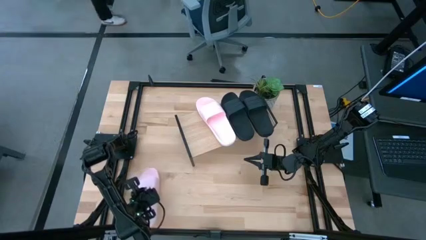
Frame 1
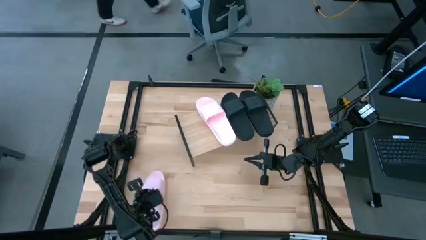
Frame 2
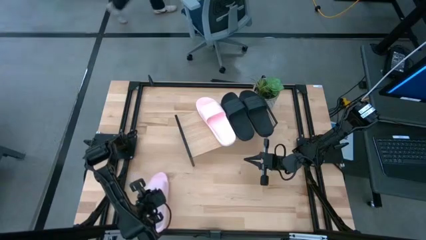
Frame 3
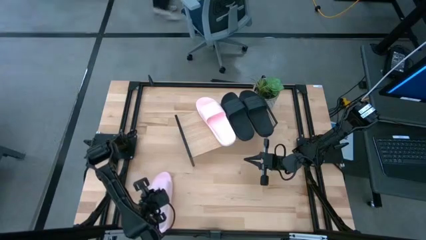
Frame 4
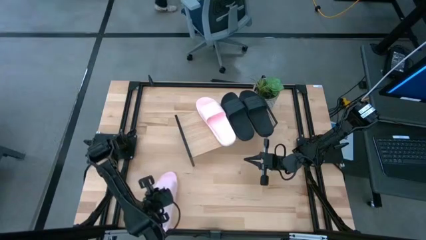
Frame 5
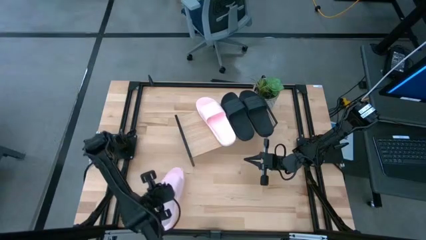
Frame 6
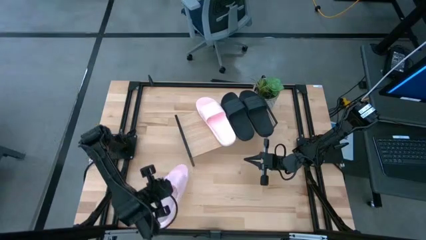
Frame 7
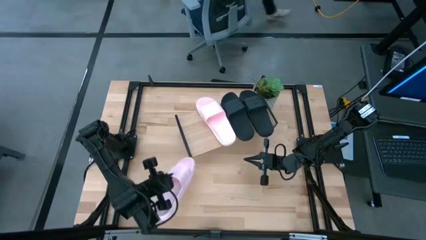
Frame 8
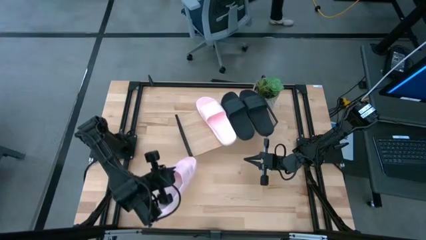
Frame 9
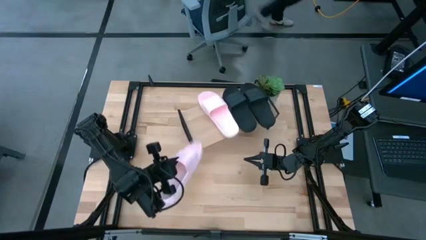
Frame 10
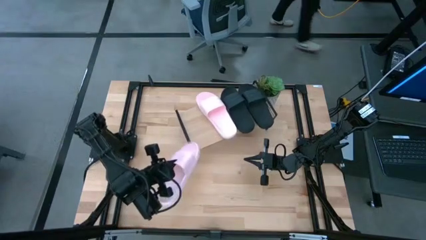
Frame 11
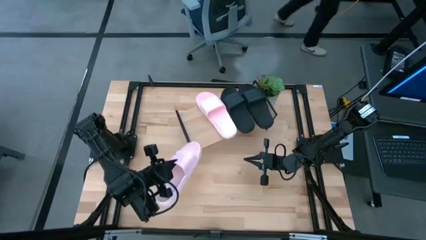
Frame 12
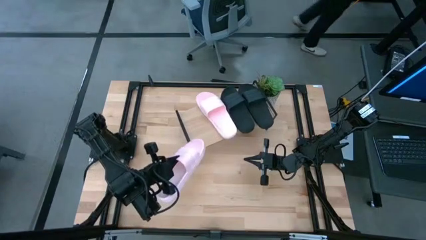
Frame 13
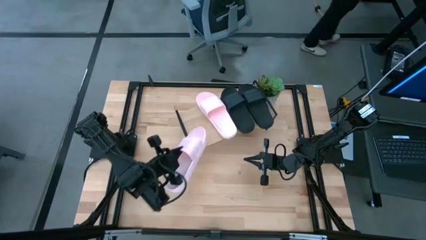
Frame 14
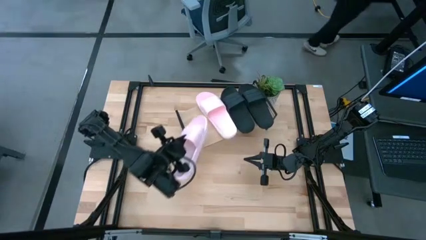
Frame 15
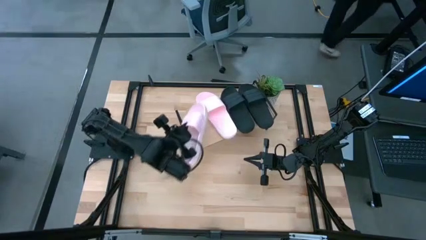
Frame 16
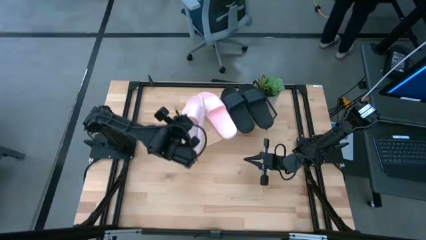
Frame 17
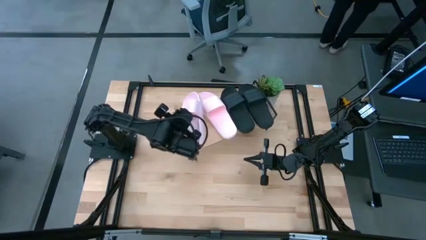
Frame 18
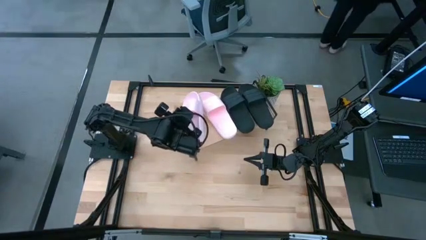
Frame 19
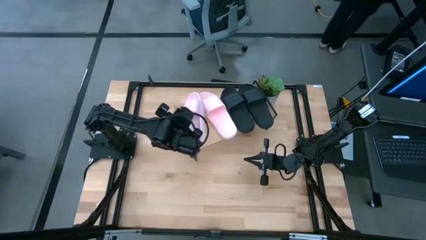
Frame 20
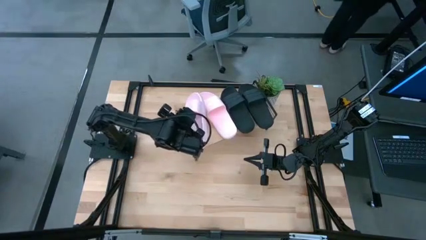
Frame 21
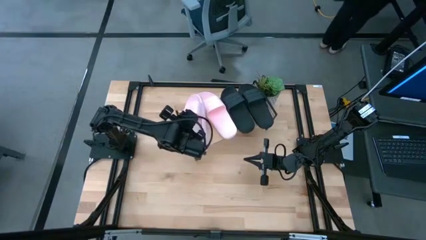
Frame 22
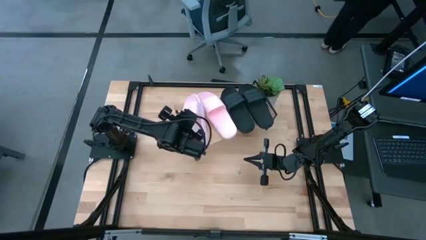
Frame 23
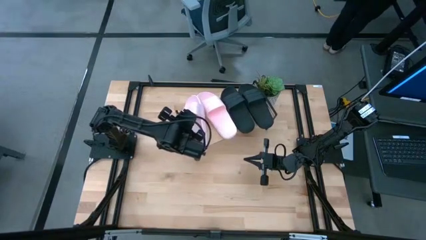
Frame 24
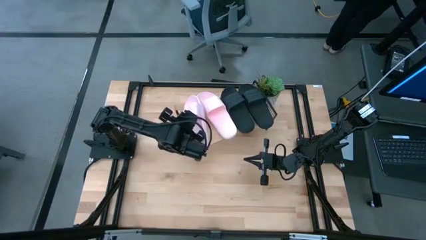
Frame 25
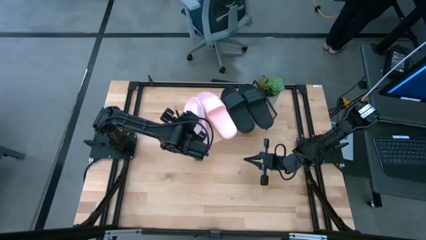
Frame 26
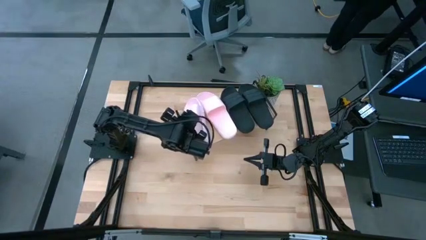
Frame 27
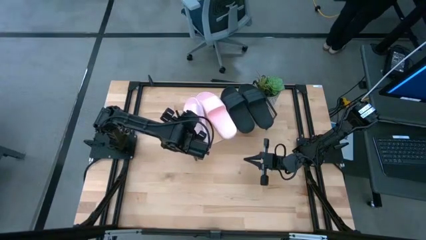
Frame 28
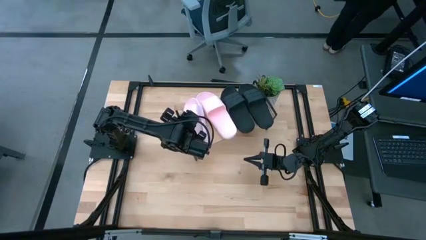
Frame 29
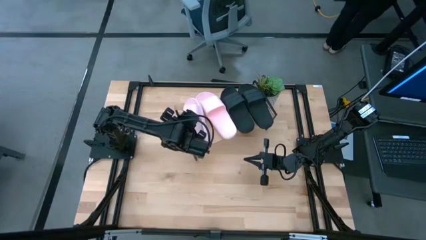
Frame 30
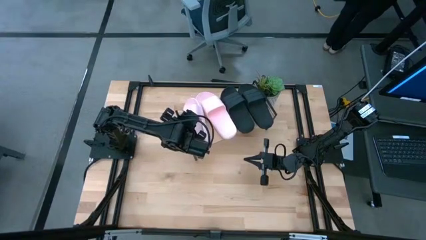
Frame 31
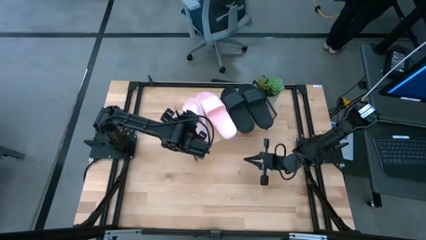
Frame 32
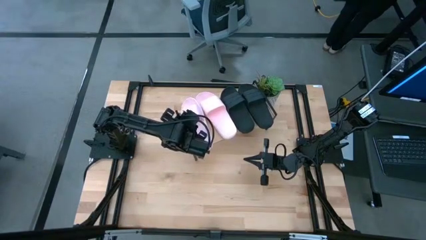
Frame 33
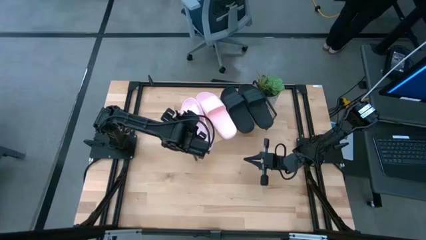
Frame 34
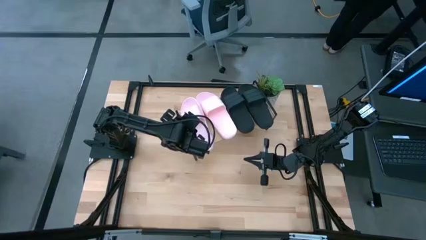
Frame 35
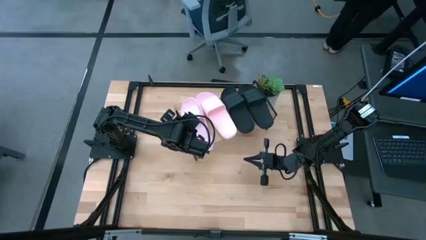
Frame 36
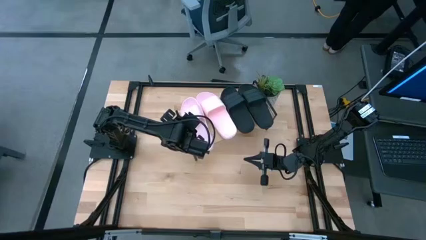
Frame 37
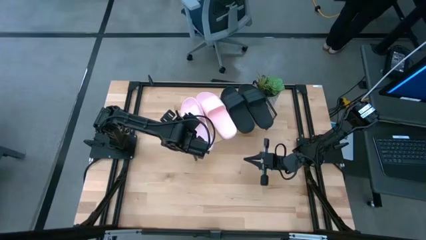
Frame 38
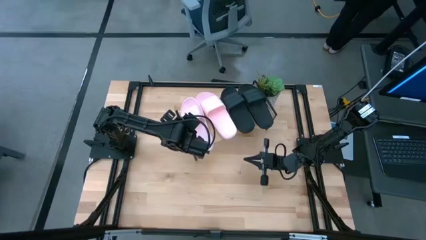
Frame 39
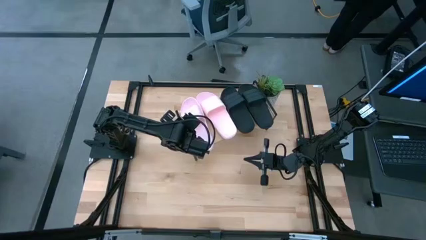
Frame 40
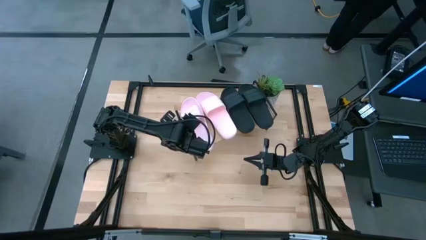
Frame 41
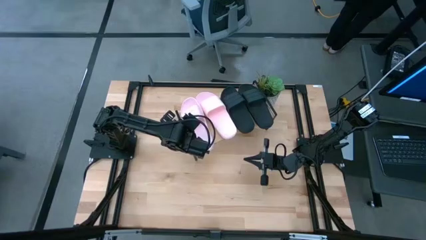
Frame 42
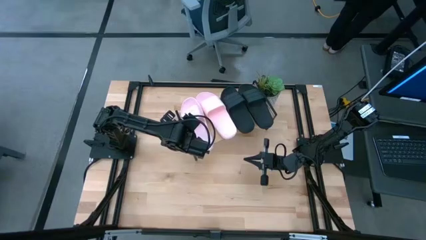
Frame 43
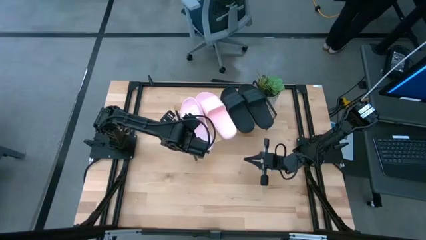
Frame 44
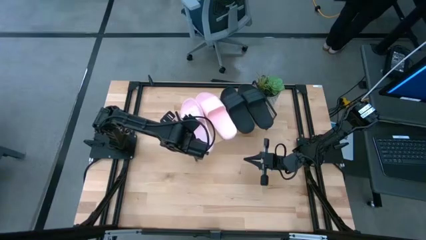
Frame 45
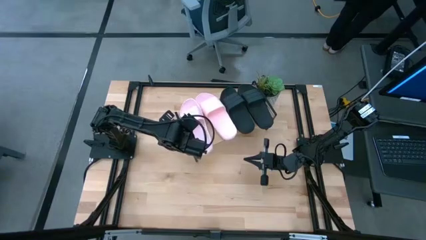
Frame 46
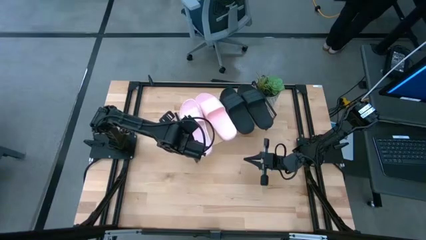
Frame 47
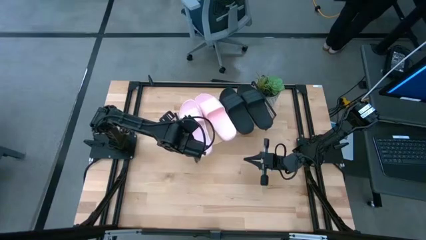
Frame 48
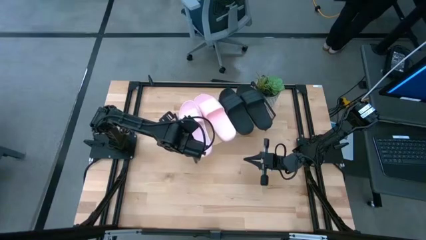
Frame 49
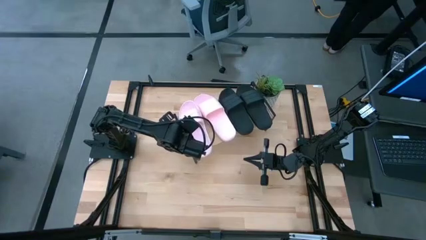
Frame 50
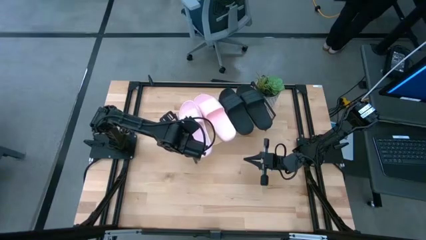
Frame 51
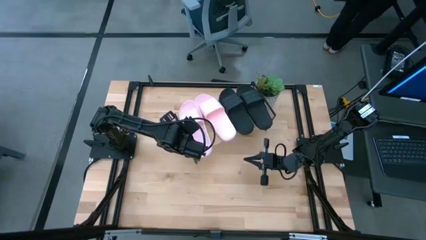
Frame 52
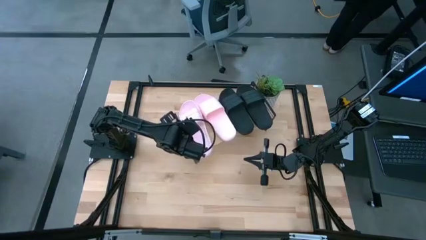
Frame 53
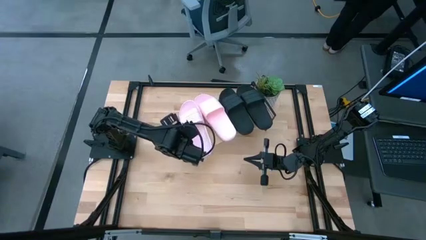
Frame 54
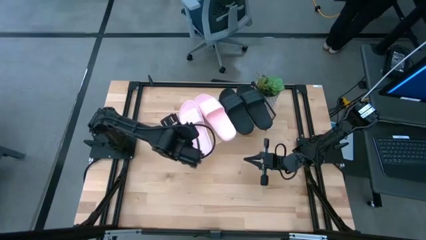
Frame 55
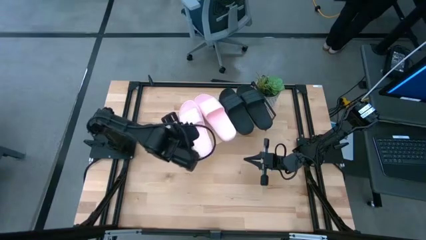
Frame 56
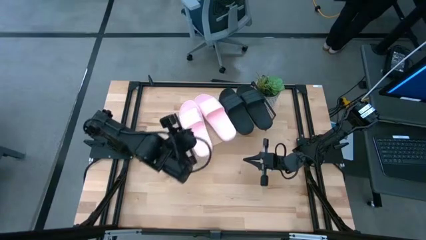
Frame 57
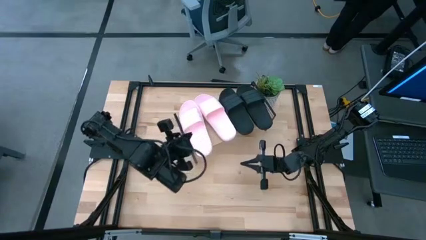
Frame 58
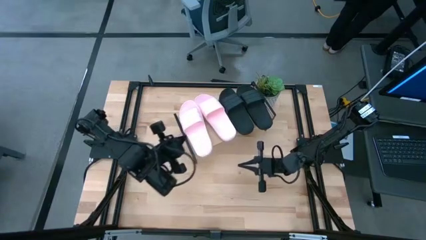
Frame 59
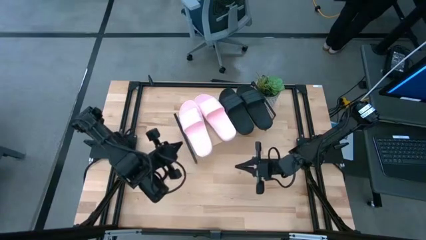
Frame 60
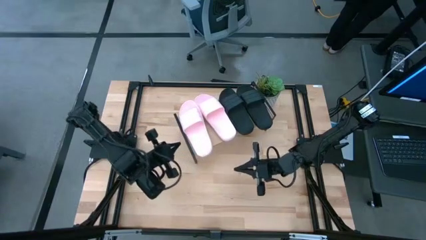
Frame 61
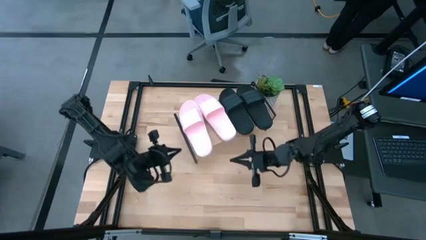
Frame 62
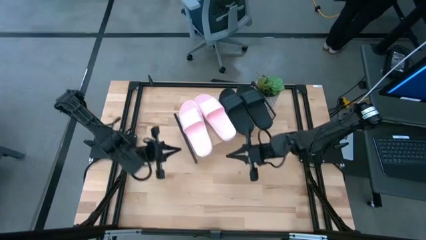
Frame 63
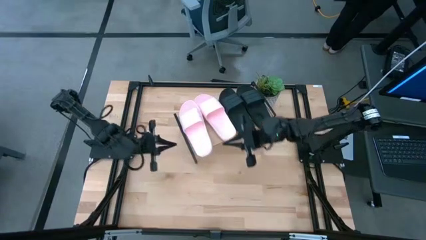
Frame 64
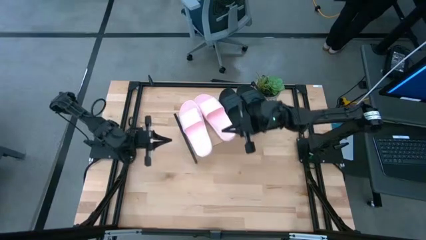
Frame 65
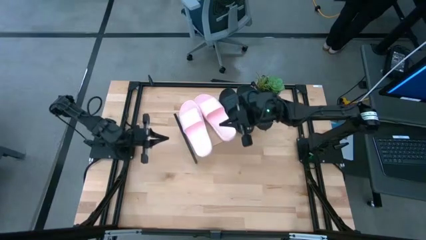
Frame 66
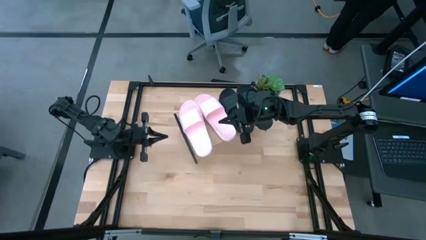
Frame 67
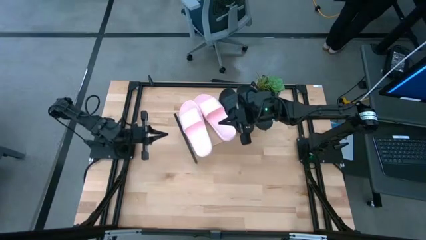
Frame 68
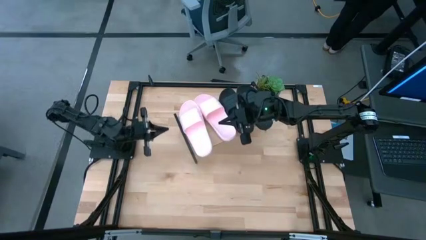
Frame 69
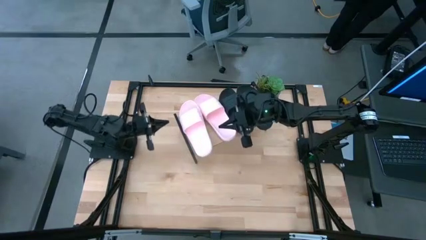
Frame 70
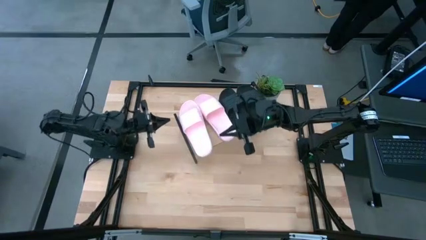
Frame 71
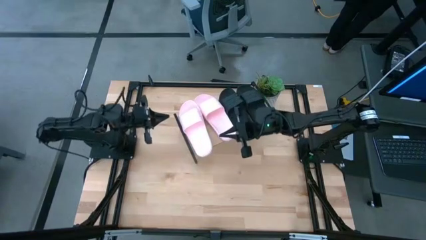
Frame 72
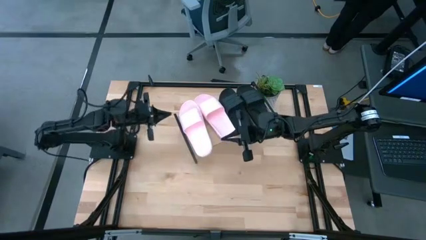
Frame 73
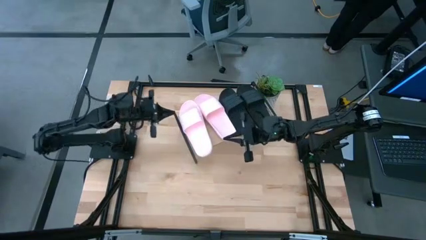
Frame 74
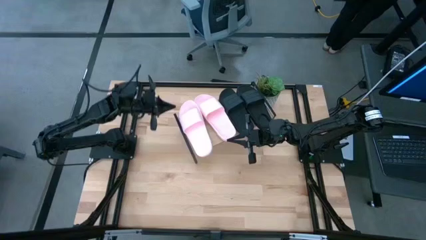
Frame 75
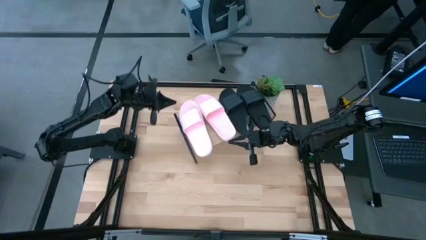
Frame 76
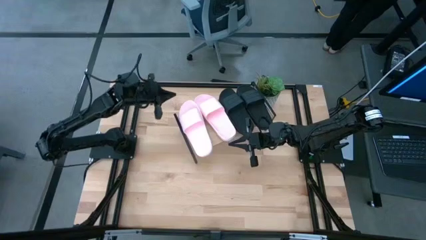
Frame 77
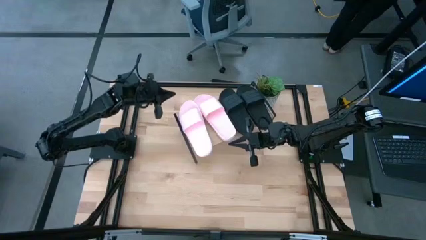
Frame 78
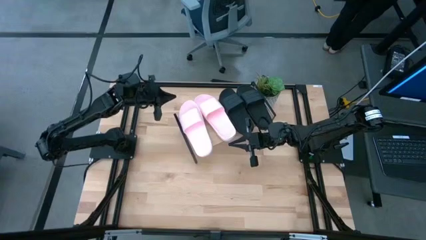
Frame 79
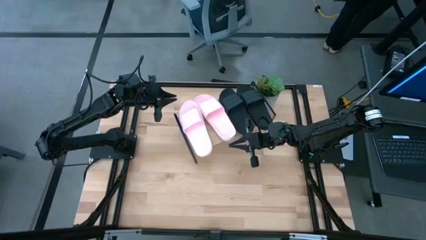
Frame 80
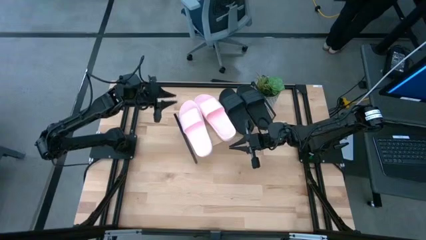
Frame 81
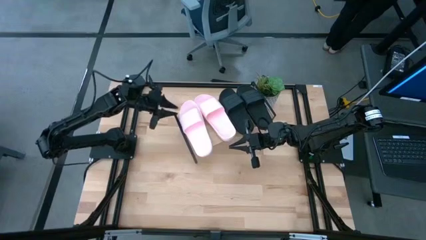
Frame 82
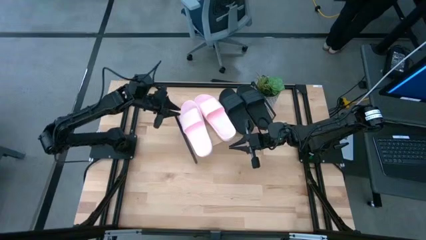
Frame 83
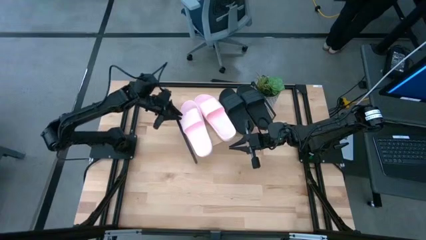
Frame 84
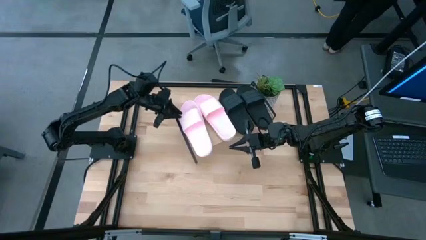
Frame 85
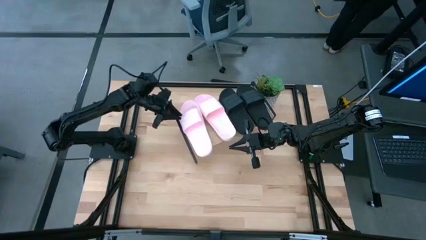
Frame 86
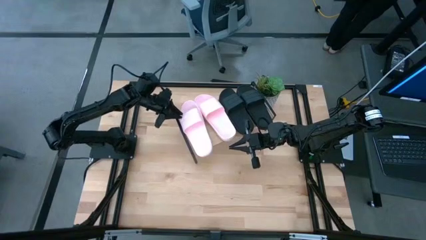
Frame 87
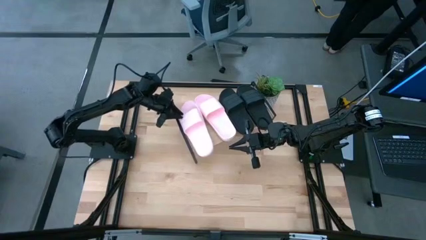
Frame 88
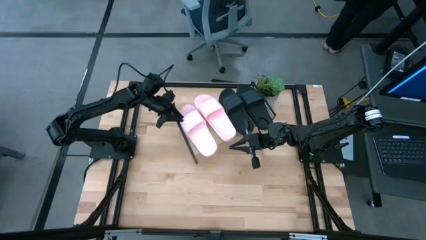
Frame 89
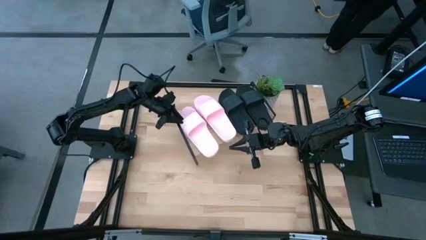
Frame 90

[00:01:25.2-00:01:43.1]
Task: Pick and place slides into the shelf
Put the left pink slide on the shelf
